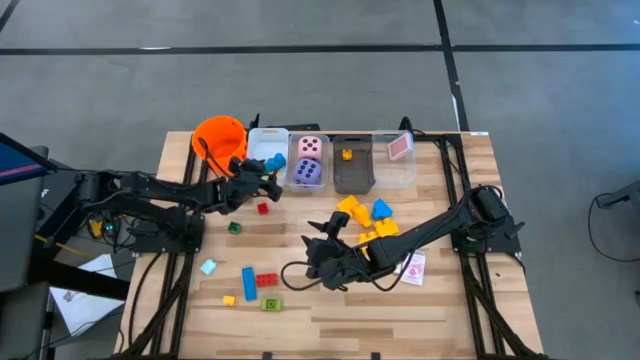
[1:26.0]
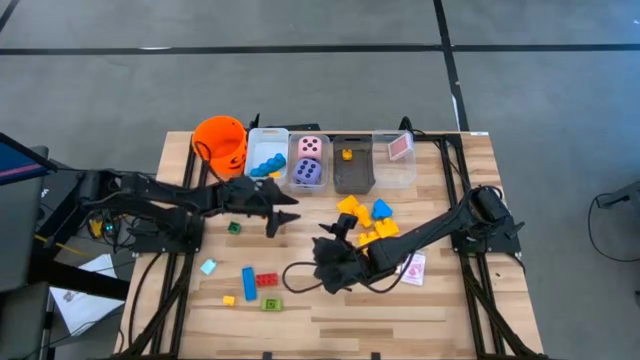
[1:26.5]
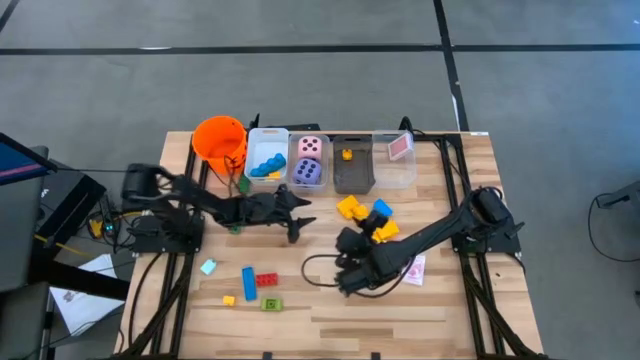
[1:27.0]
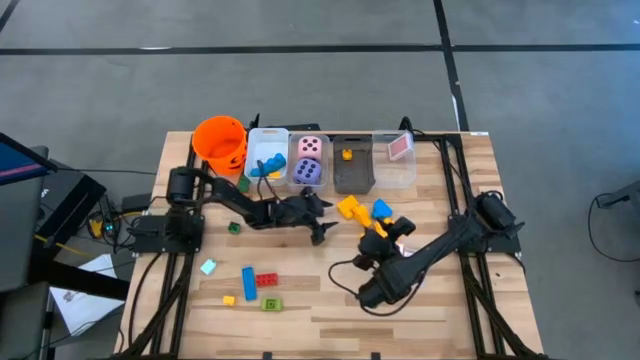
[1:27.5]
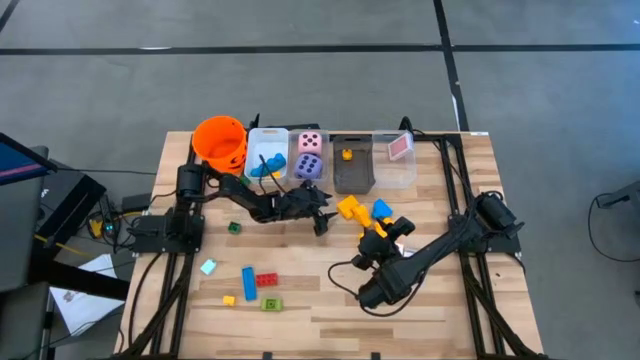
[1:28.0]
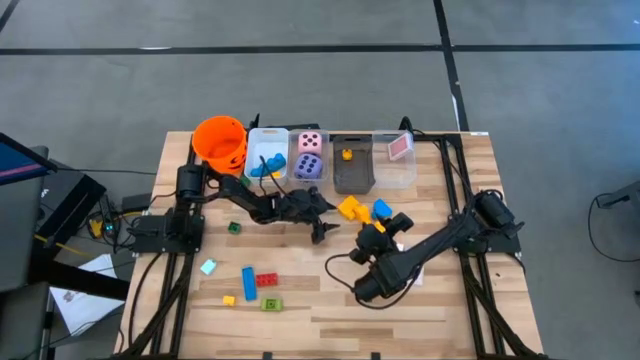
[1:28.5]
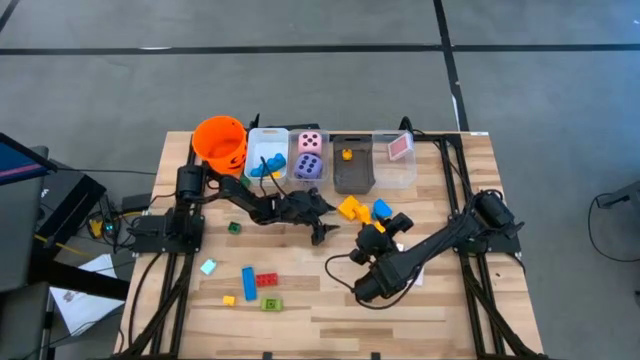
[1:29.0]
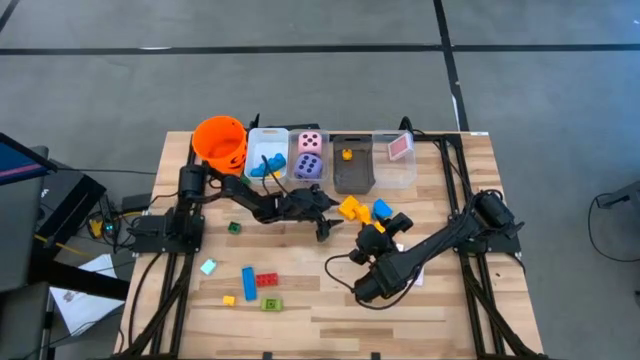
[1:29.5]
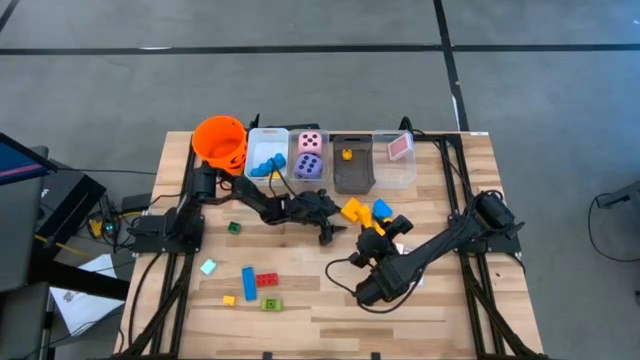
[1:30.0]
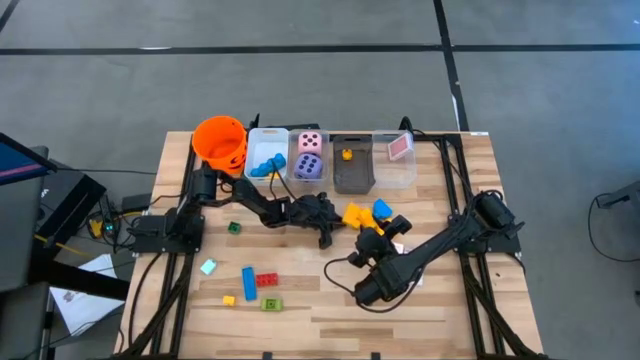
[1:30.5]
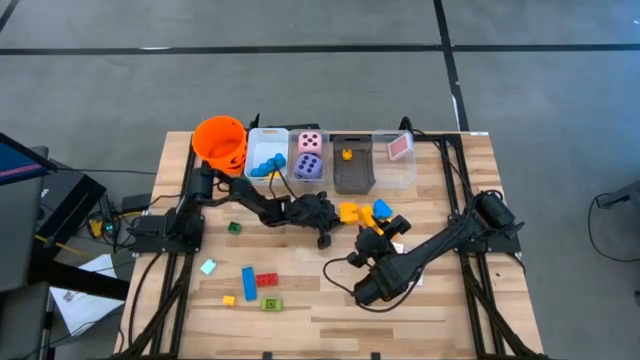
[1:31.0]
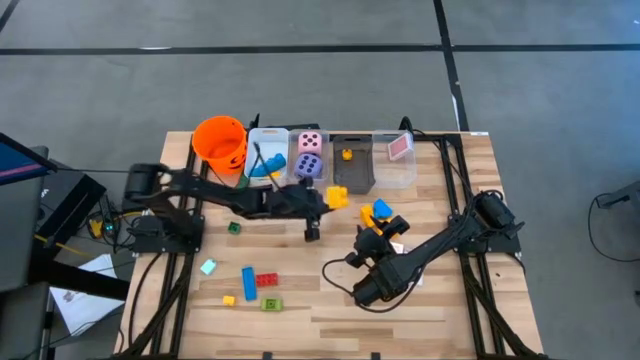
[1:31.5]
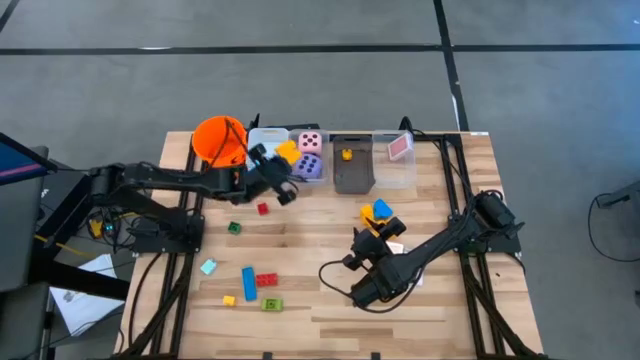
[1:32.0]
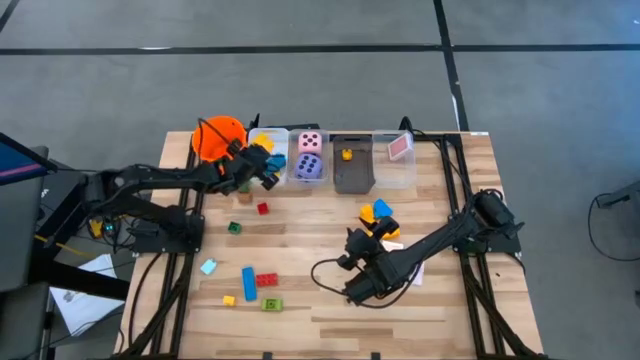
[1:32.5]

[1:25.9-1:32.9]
Task: Pick & Place Toys
Put the yellow stud game piece into the white bin

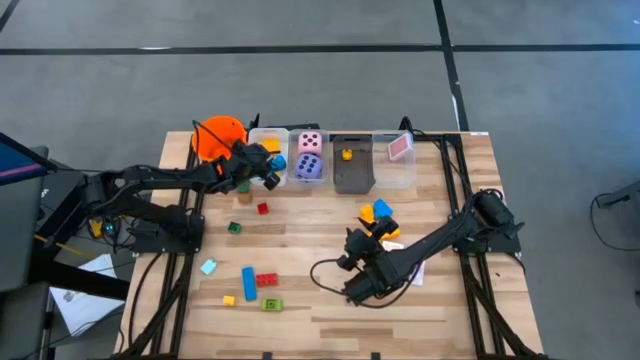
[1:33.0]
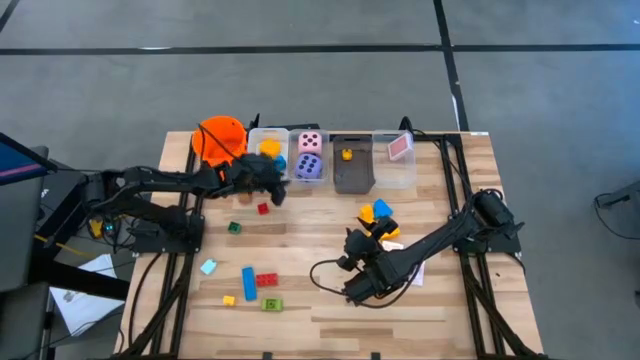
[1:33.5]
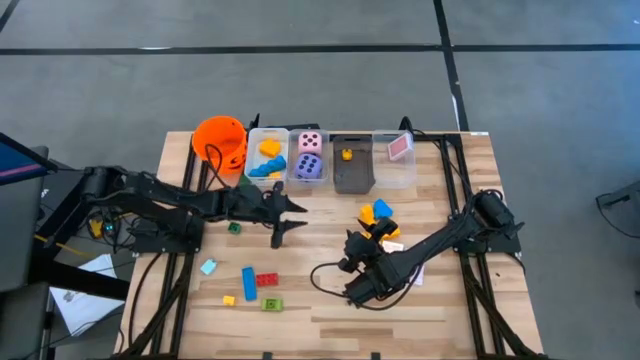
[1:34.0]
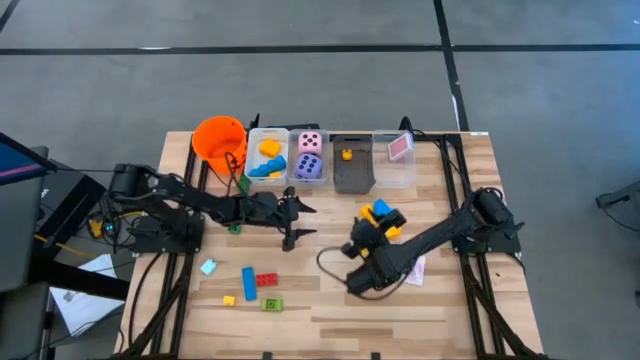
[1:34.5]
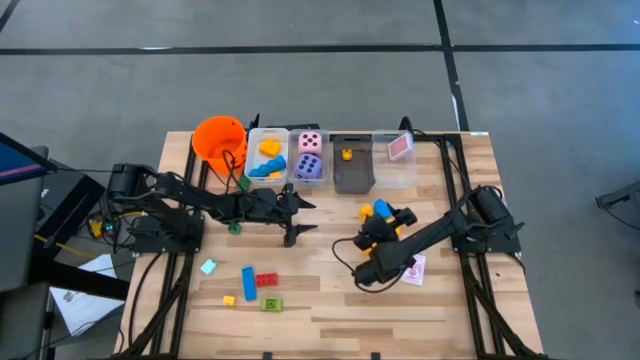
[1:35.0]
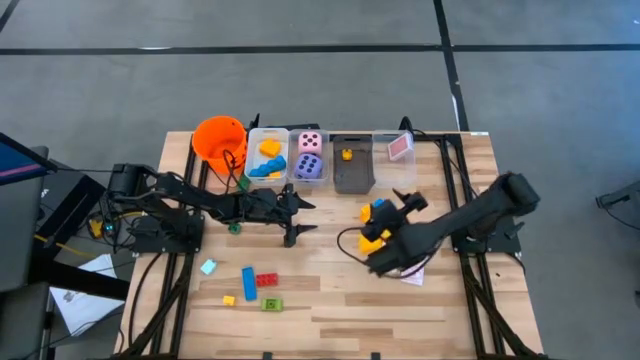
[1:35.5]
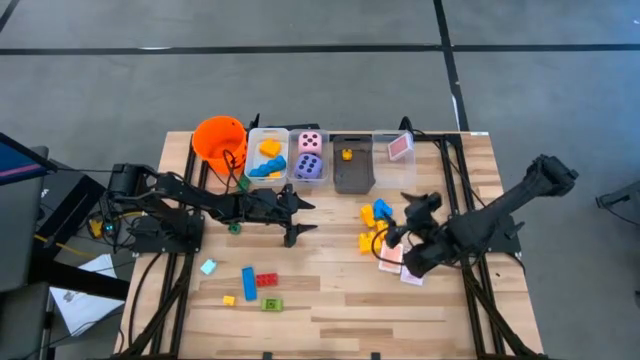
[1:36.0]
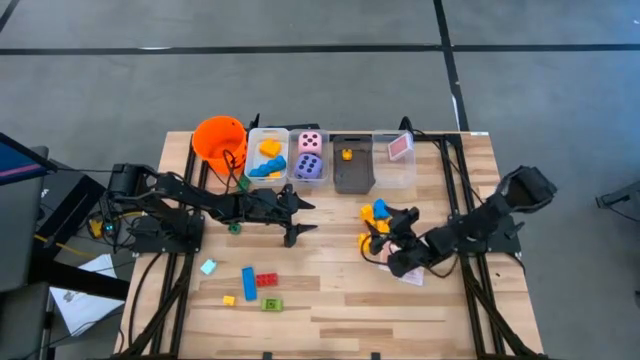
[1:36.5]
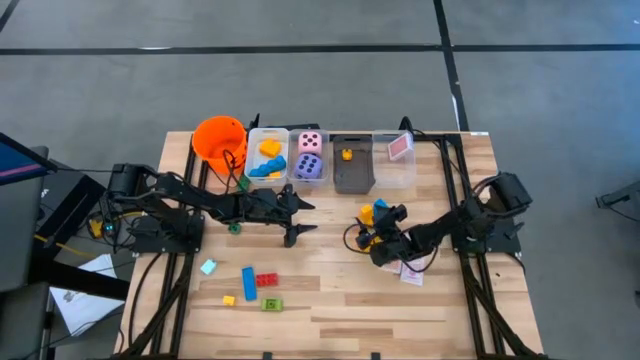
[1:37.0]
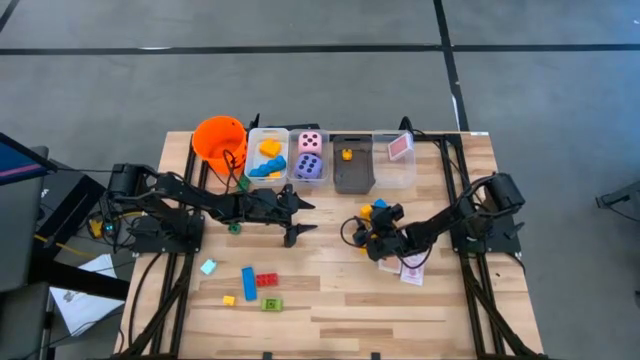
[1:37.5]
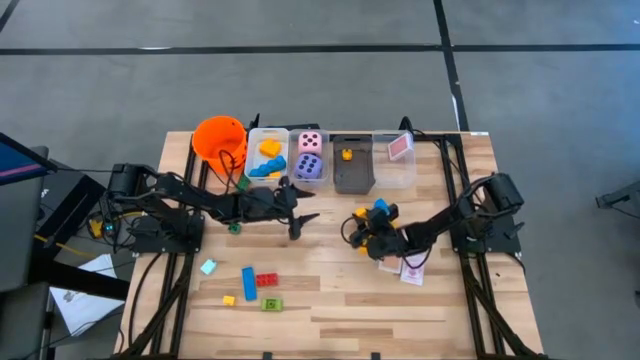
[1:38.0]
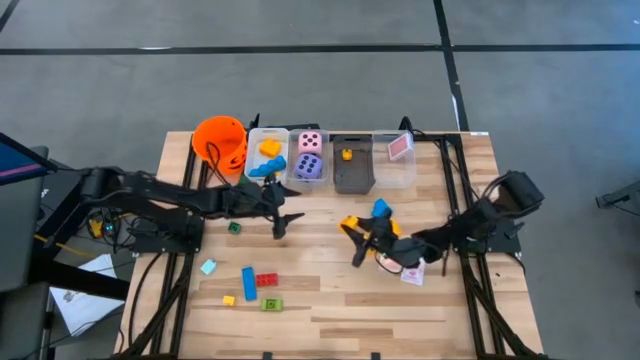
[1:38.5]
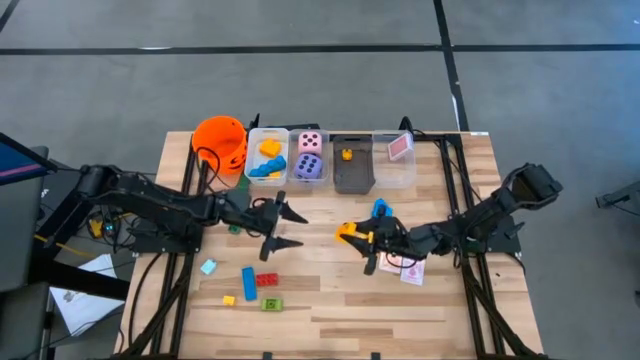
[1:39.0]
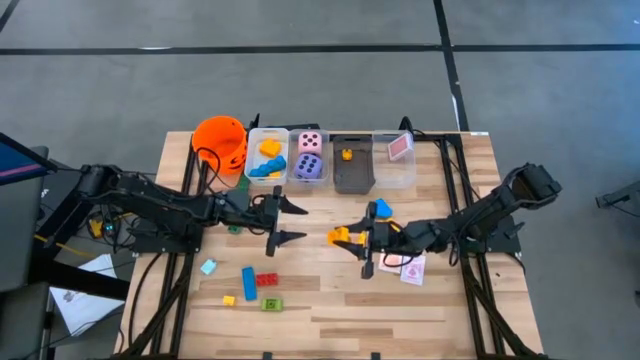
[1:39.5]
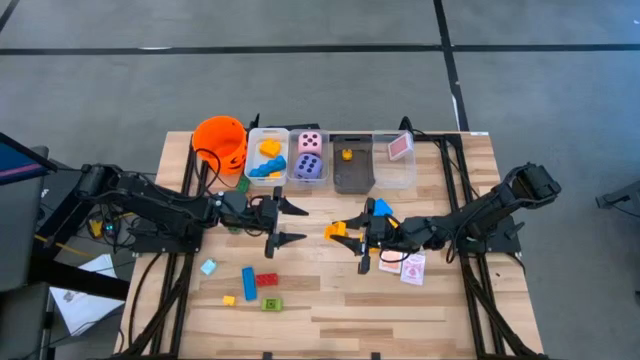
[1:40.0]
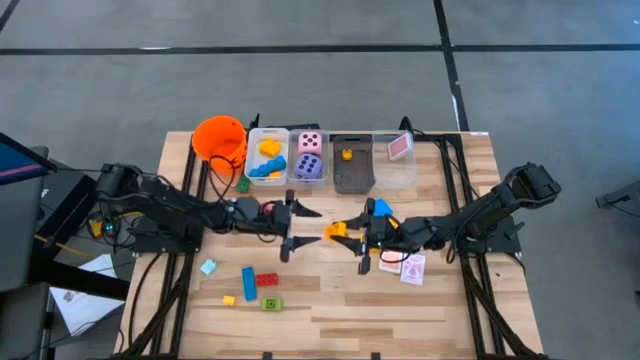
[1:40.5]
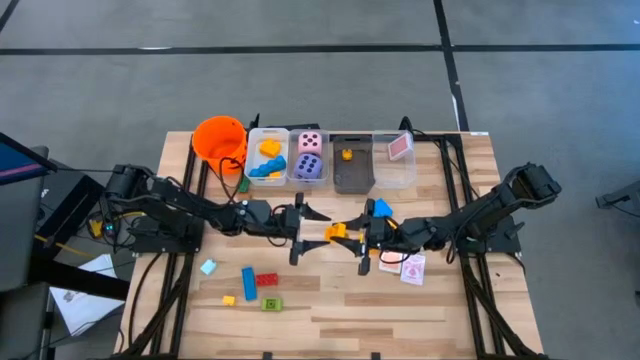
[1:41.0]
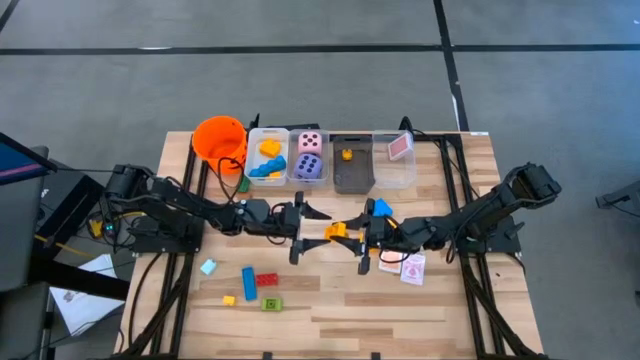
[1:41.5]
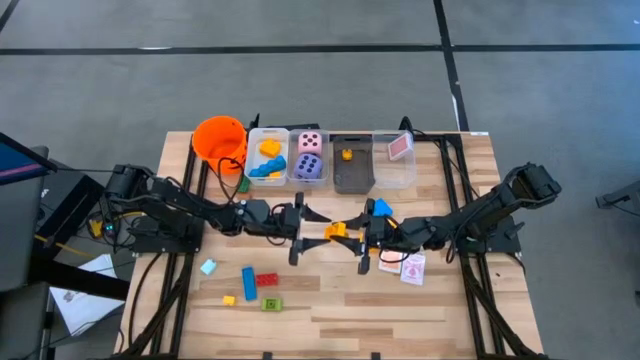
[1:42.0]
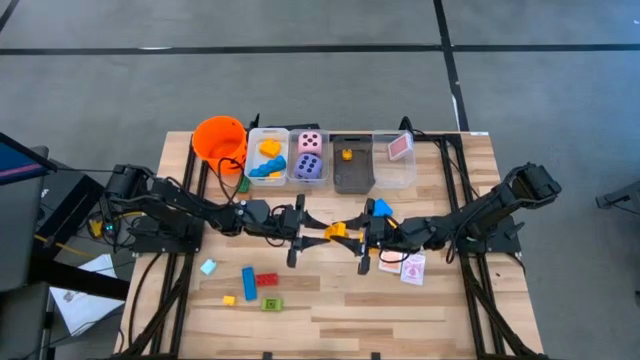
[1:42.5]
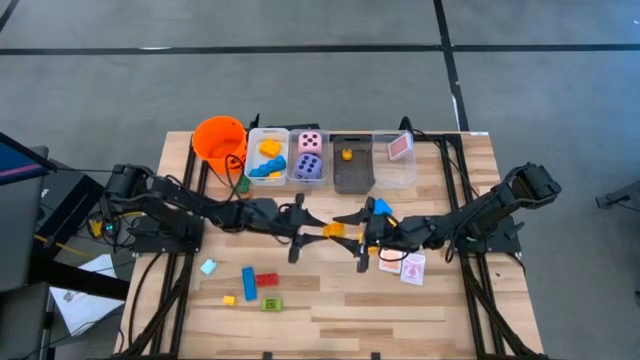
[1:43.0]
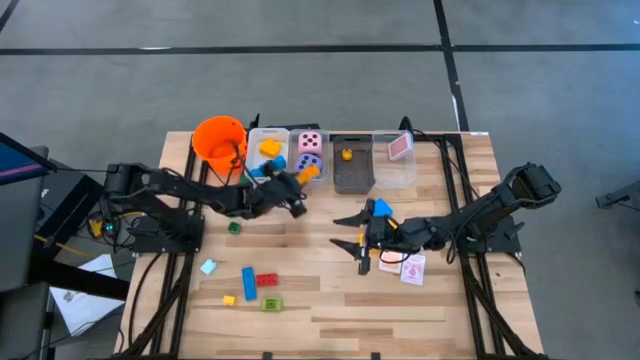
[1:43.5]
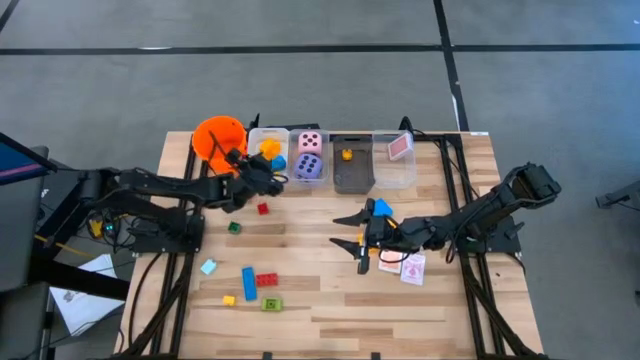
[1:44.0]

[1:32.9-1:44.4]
Put the yellow stud game piece into the white bin

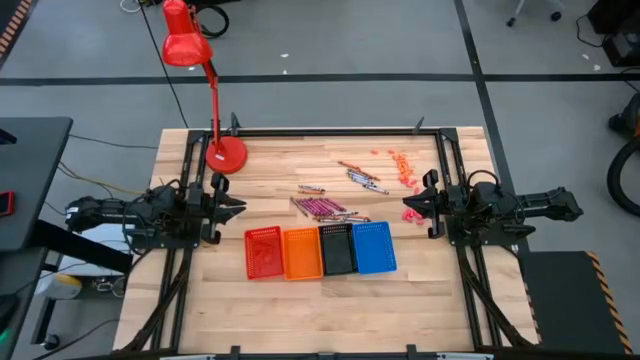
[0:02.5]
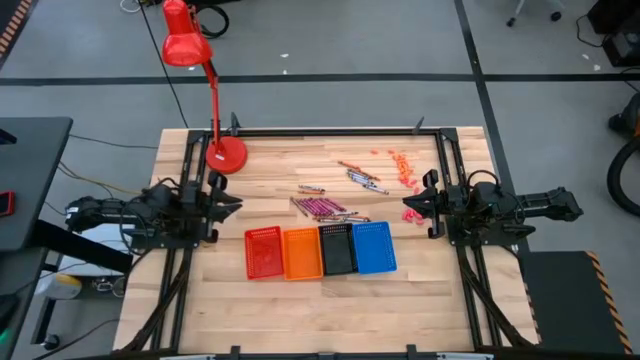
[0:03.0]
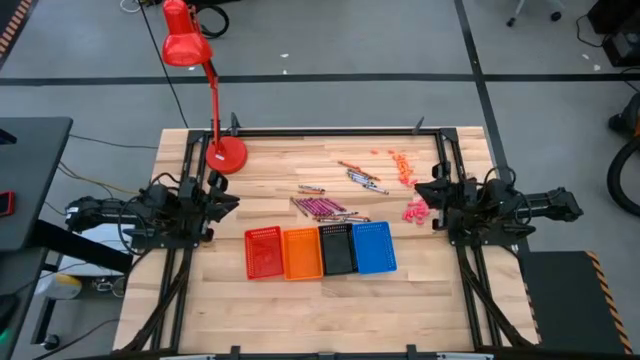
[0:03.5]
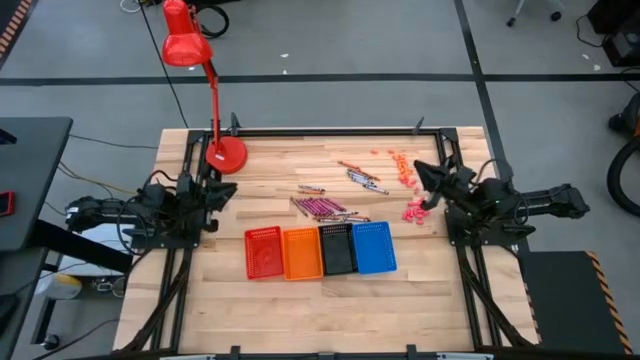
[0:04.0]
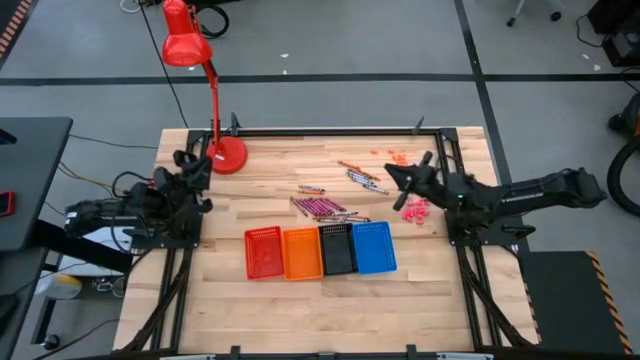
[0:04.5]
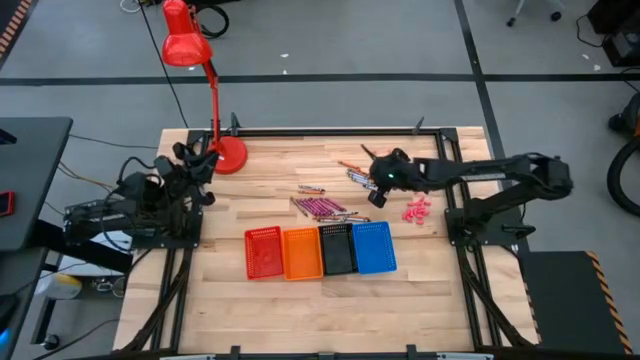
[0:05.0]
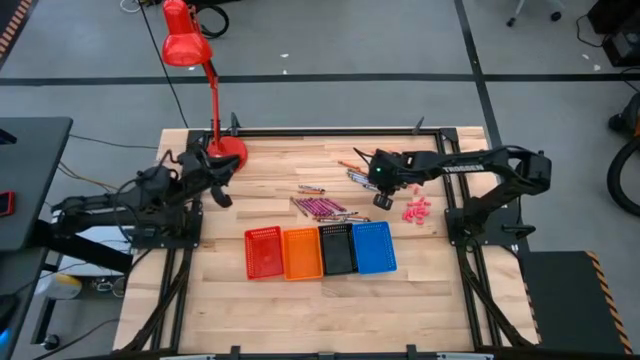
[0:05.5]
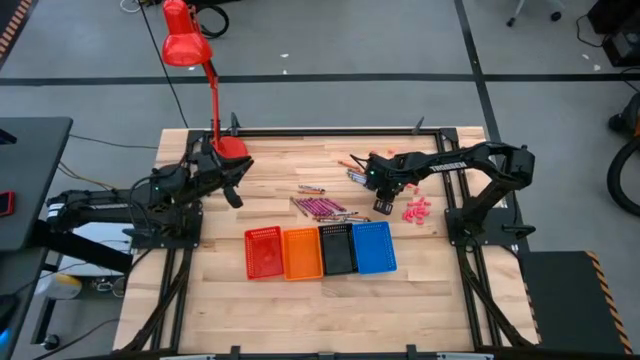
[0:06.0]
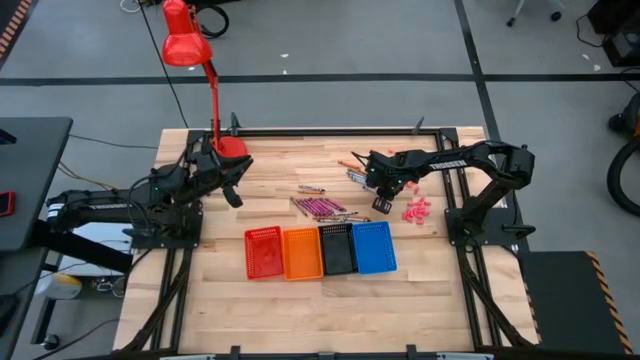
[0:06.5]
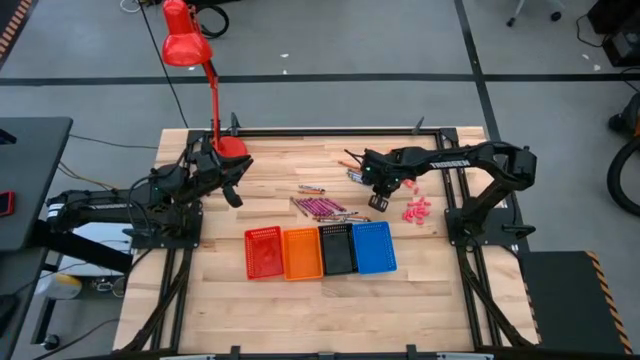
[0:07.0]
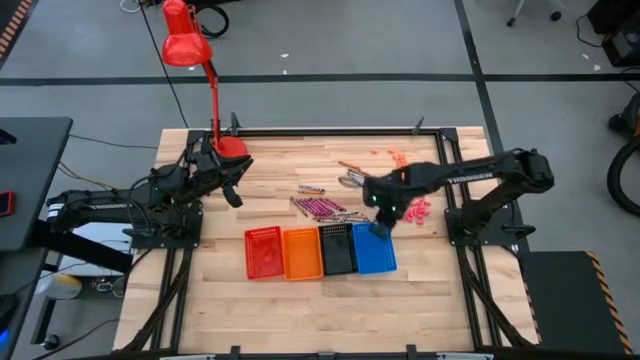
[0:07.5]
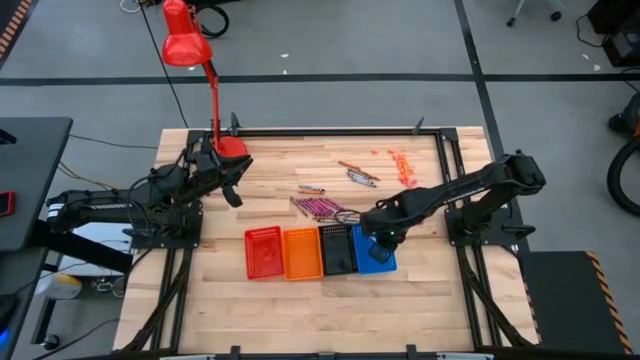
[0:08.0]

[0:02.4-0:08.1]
Task: Sort crayons
Put the black crayon into the blue bin
